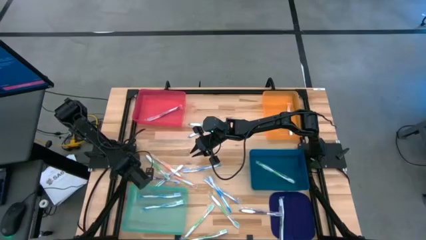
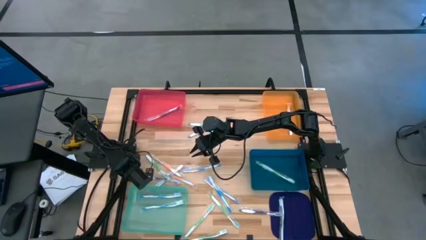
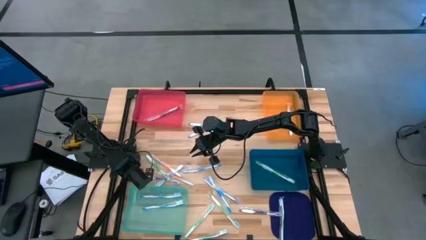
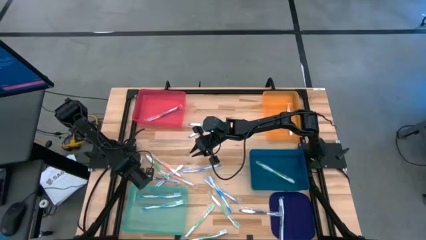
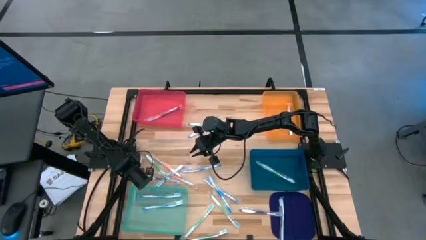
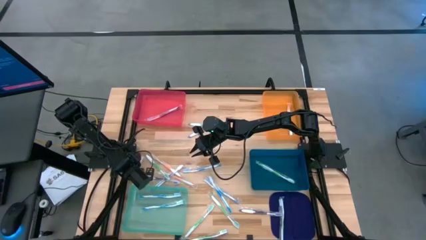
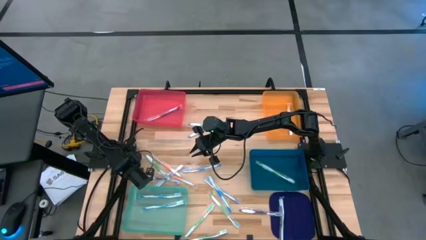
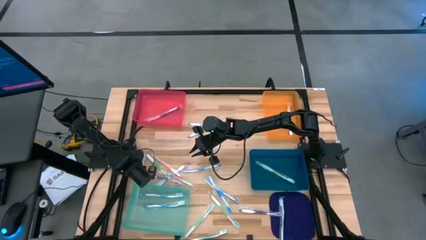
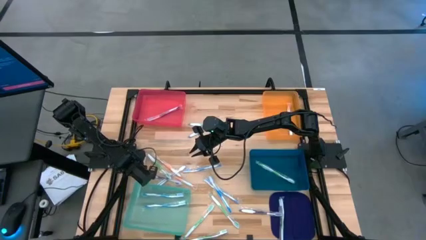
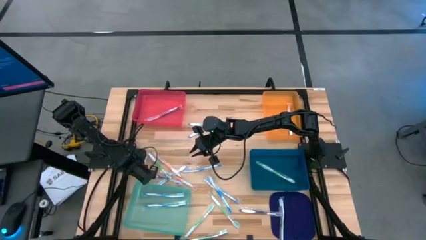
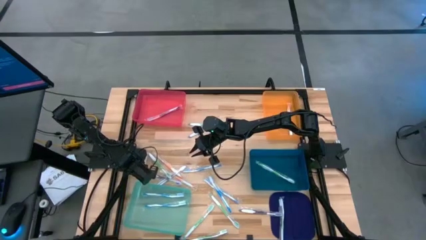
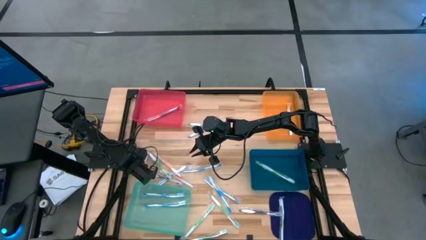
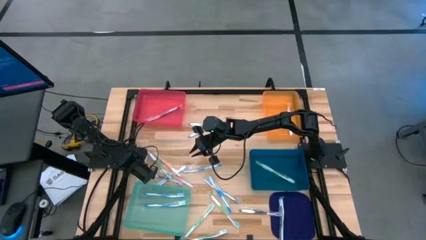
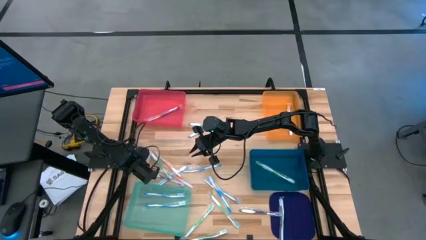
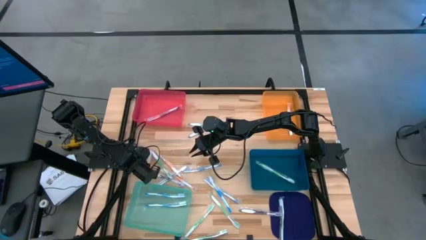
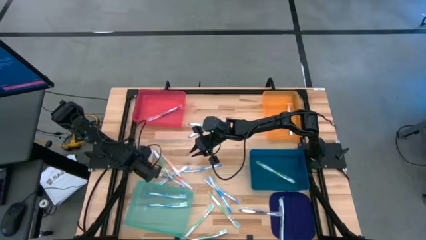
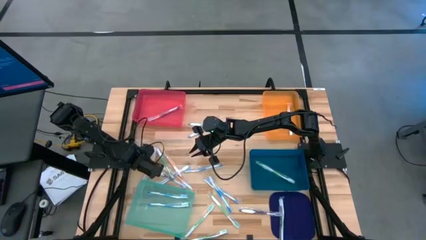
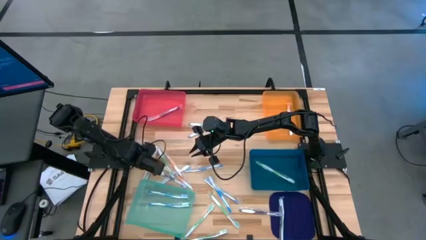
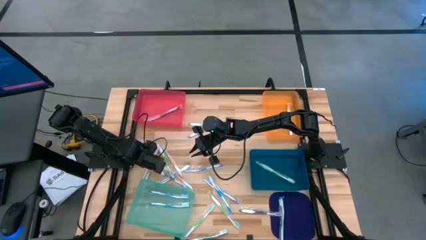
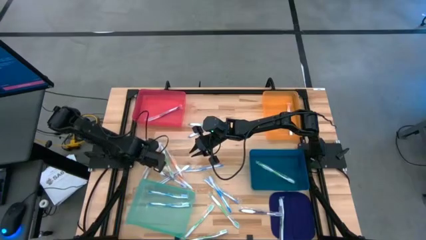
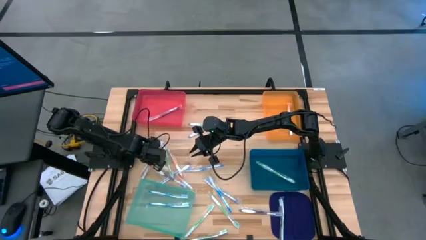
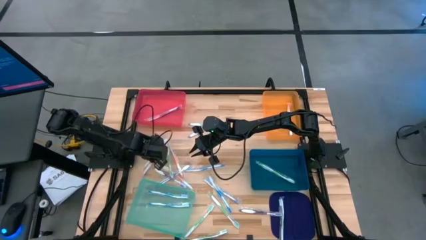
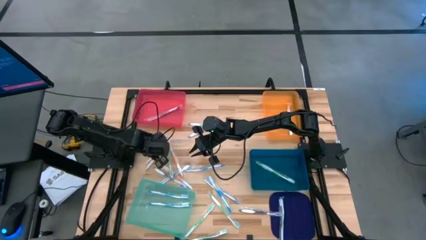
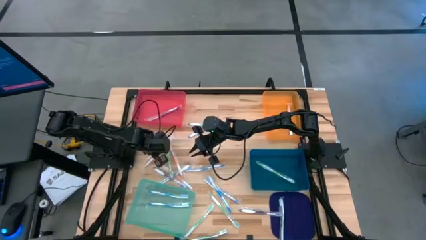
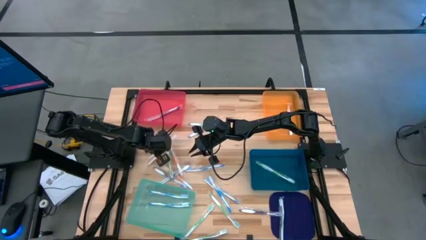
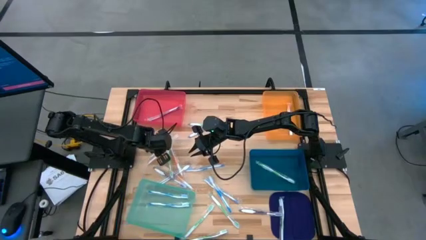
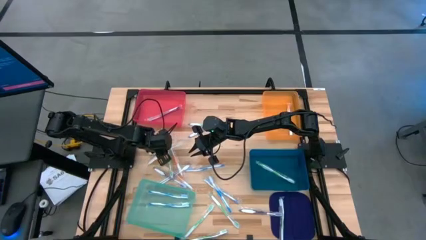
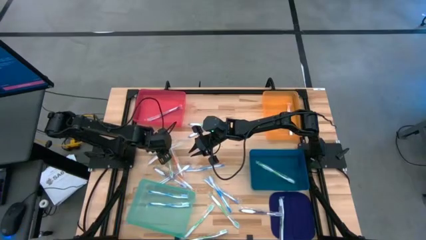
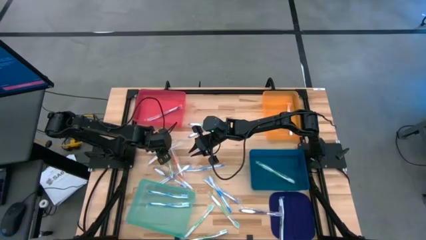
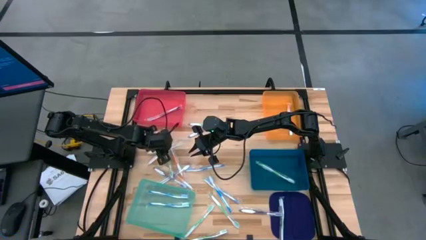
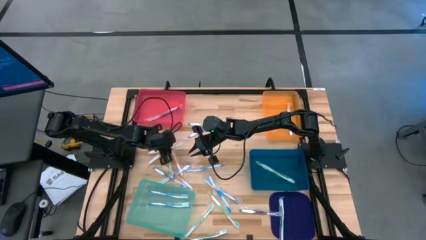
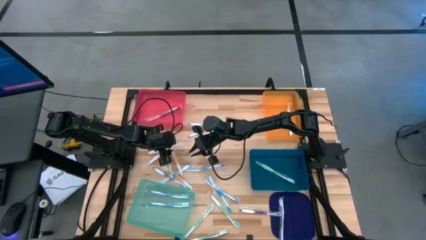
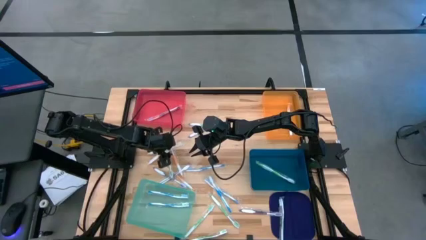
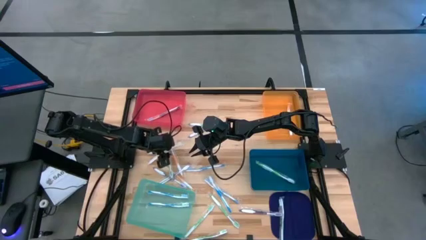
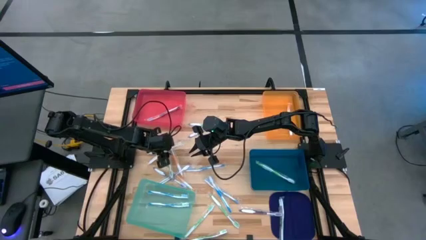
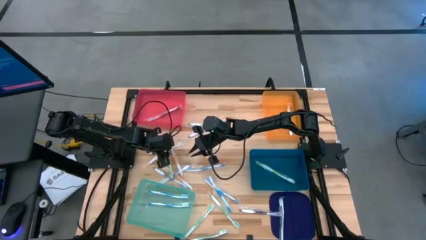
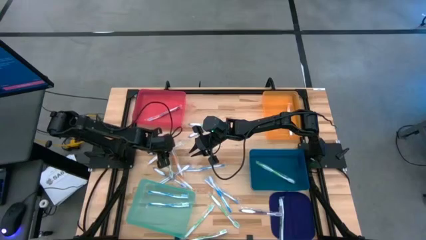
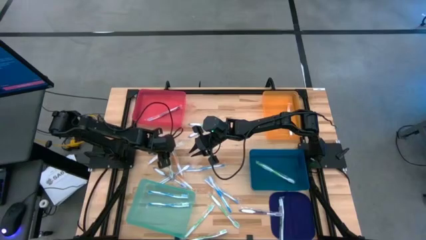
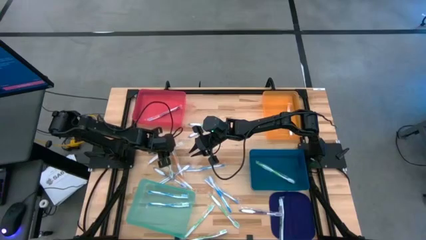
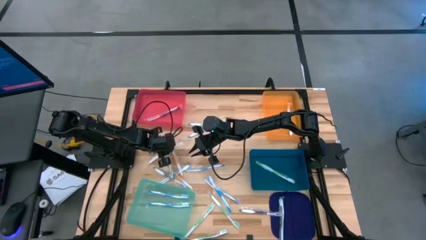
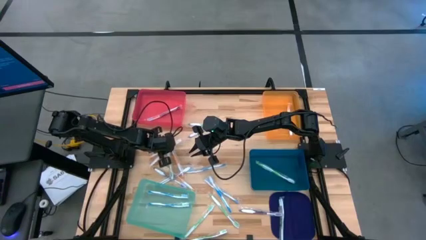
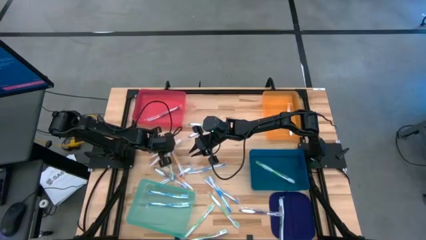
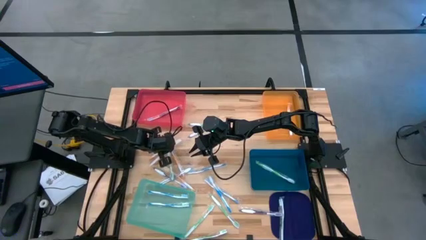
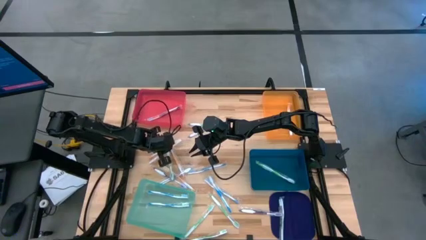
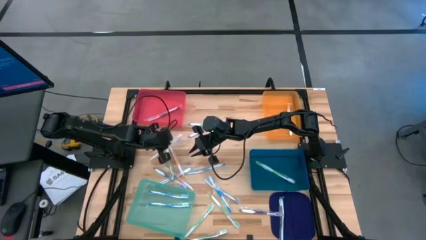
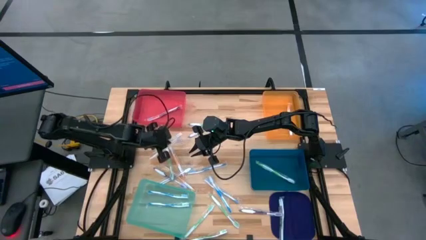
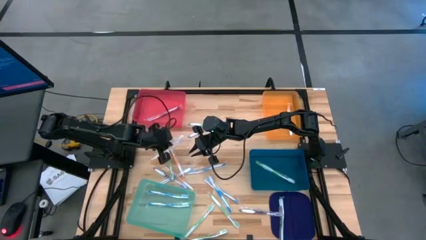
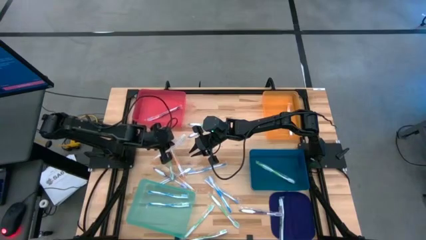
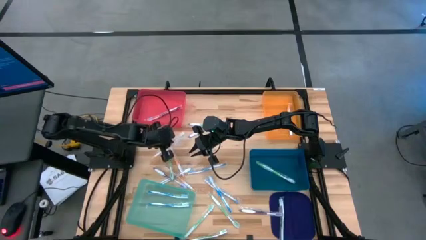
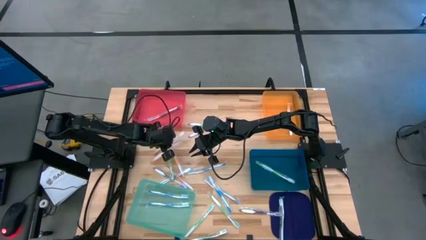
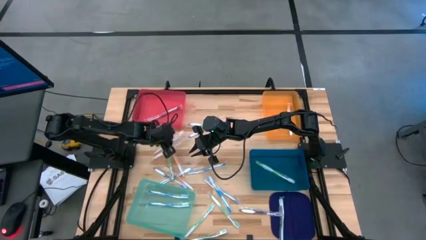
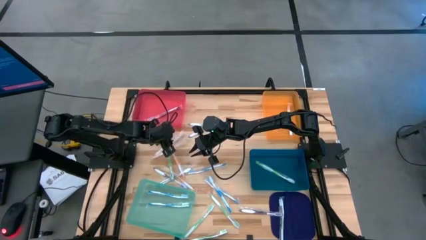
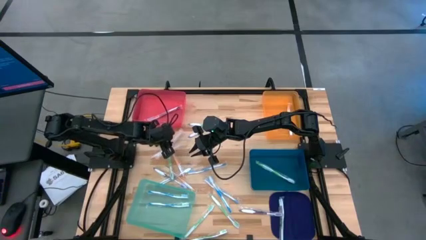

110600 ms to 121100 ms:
Task: Pick & Place Toothbrushes
Put the orange toothbrush into the orange bin

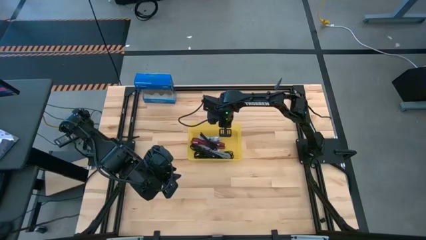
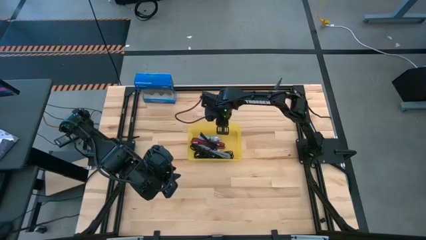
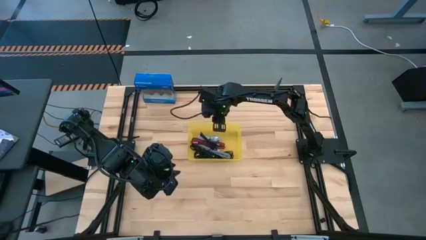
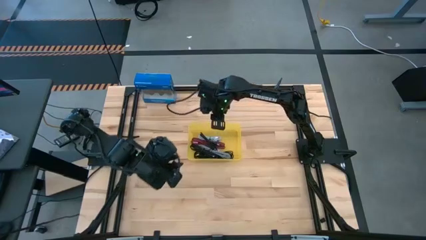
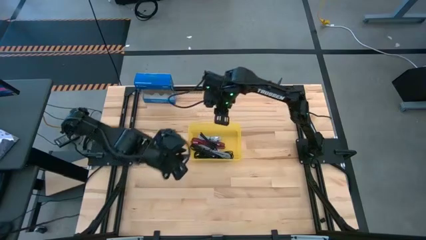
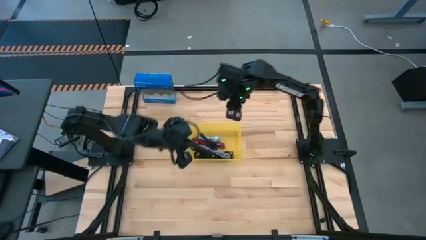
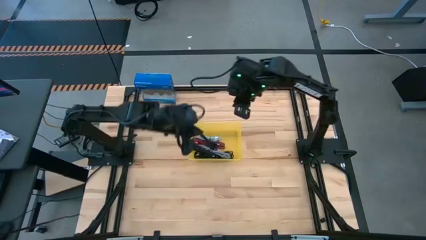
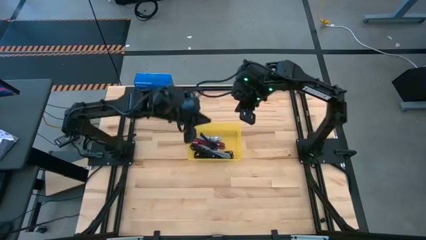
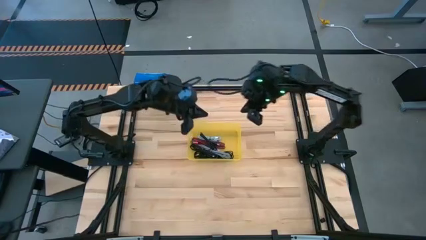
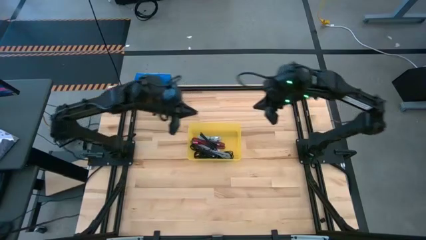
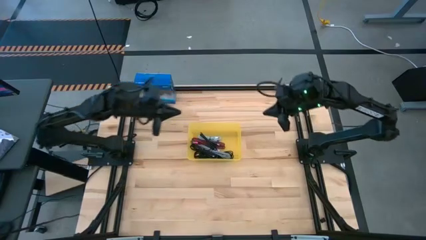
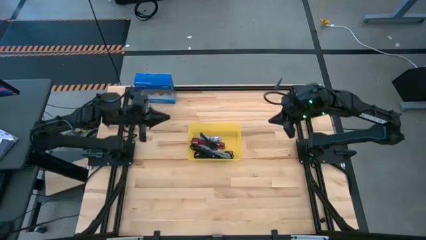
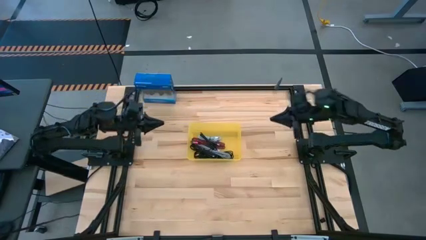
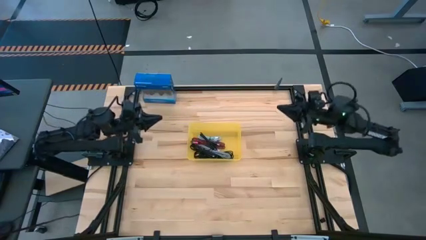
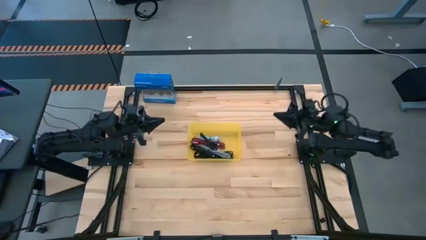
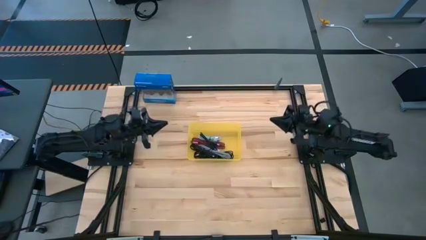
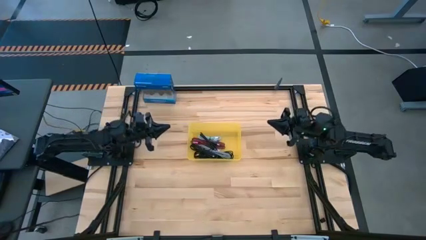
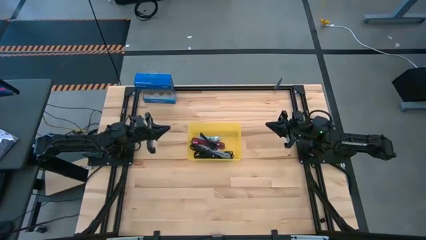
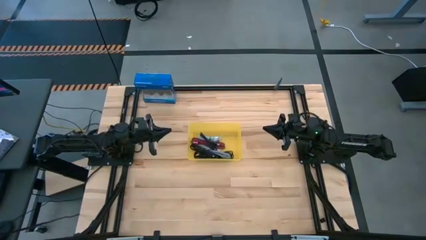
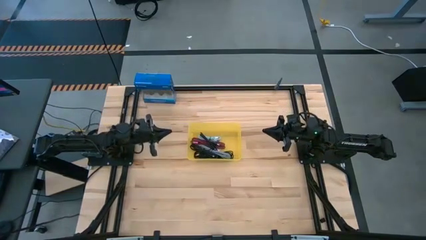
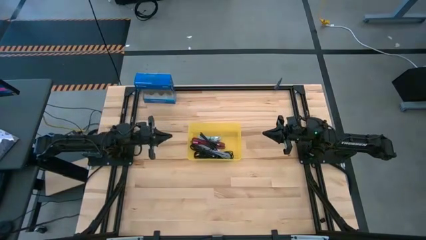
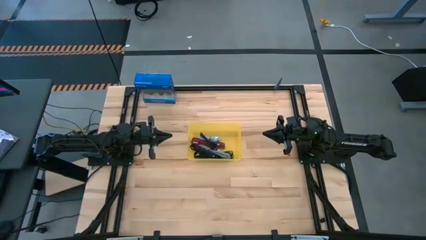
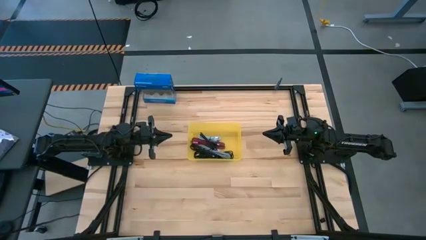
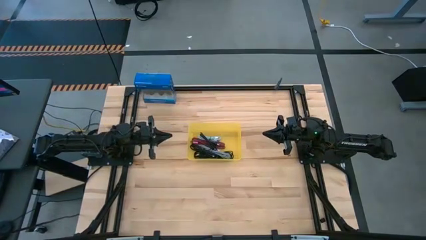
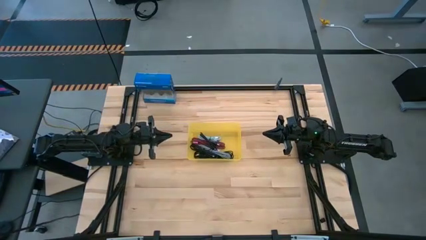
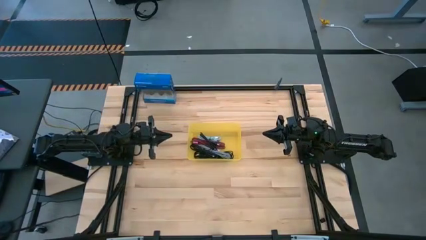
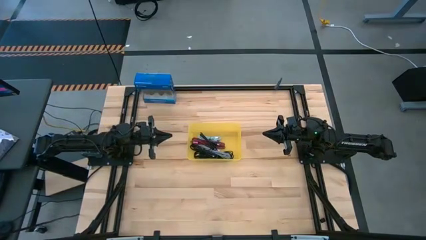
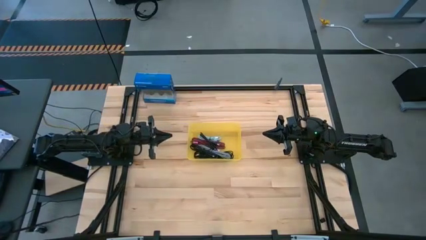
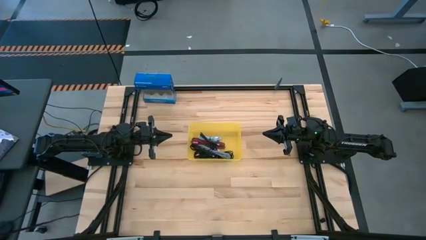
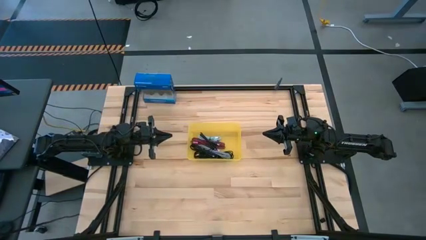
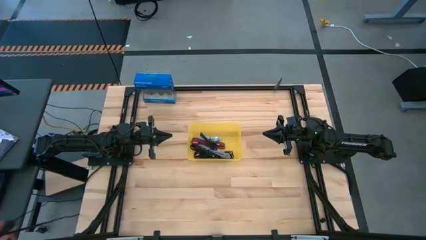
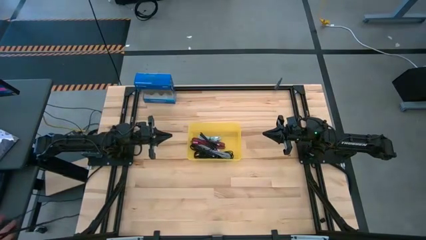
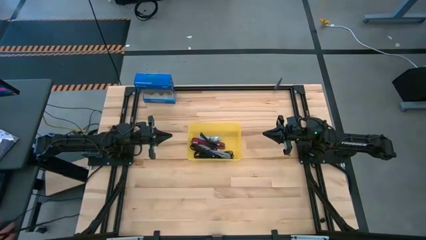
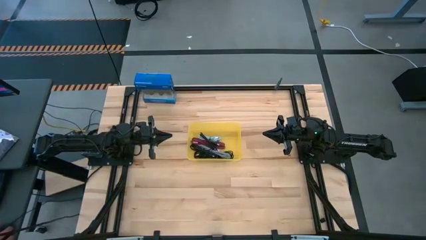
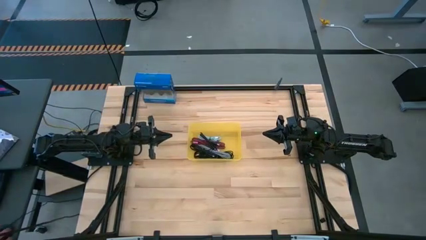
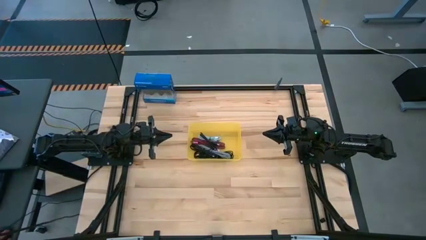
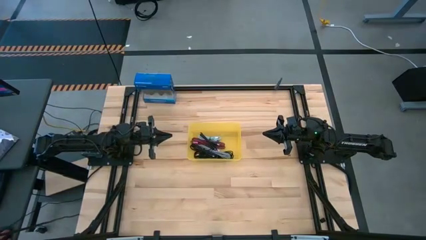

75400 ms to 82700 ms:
Task: Pick and place USB-C Cables
Return to Home Position
